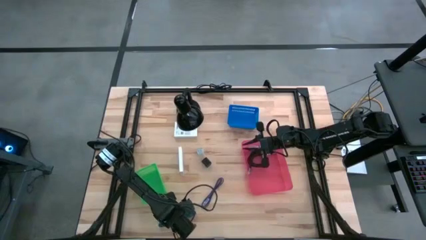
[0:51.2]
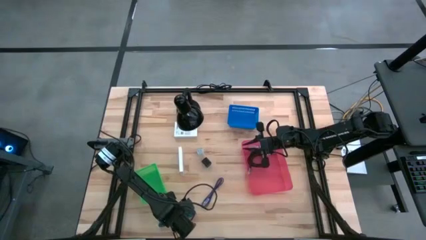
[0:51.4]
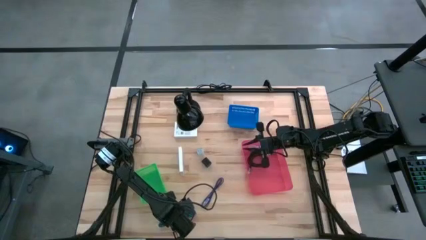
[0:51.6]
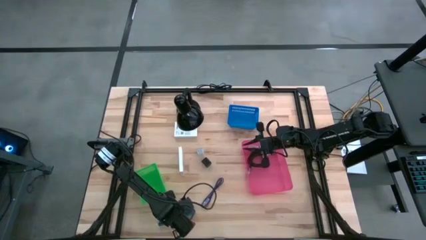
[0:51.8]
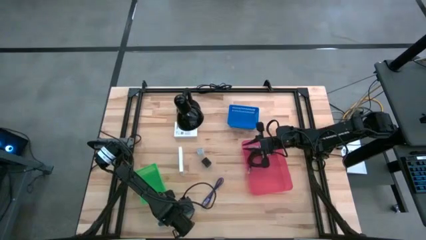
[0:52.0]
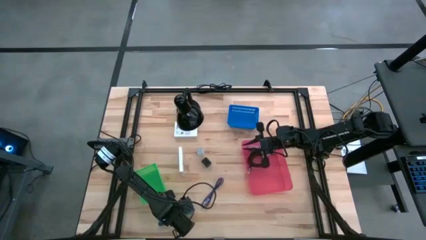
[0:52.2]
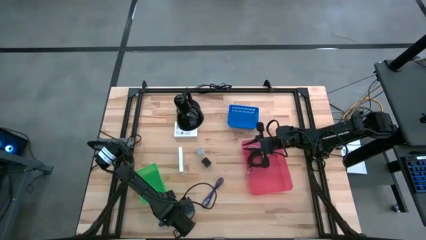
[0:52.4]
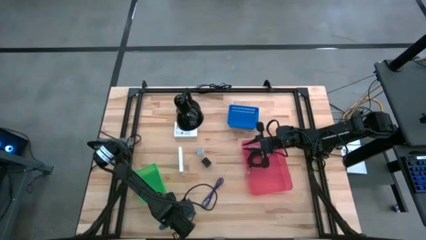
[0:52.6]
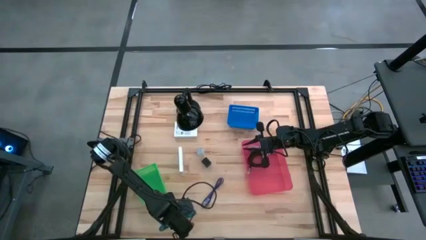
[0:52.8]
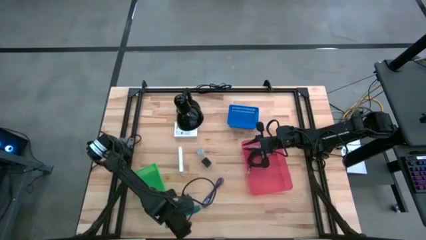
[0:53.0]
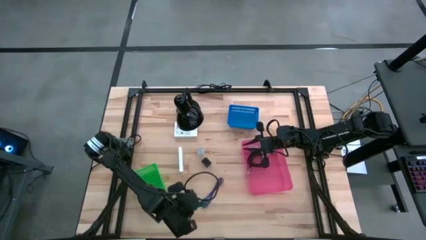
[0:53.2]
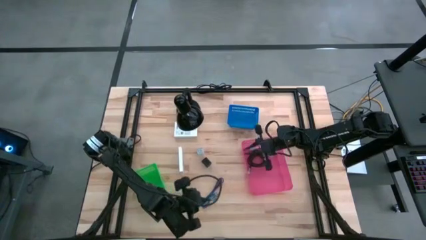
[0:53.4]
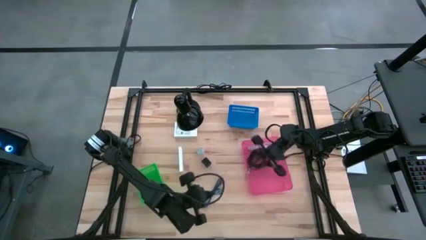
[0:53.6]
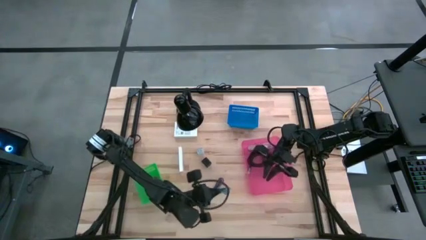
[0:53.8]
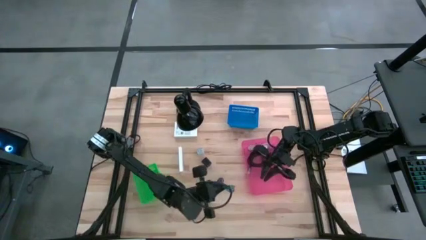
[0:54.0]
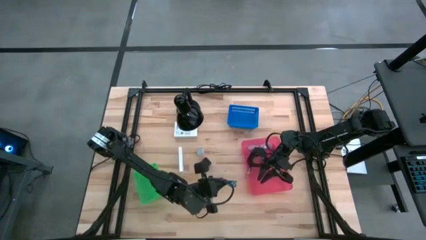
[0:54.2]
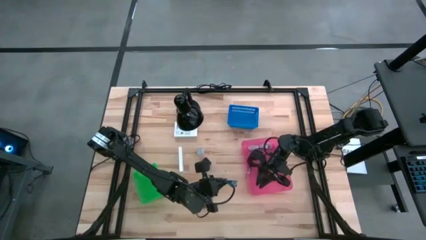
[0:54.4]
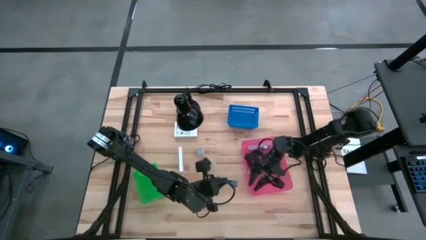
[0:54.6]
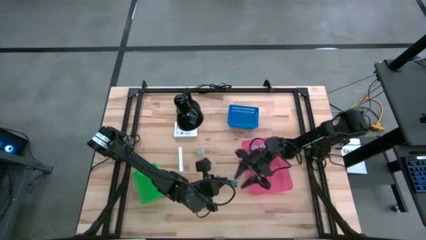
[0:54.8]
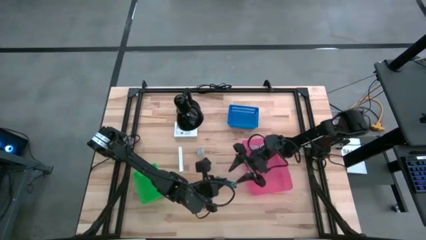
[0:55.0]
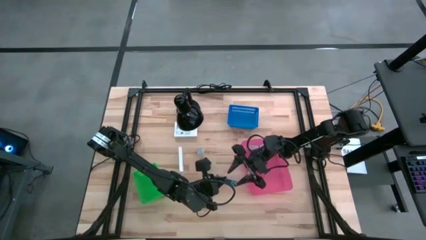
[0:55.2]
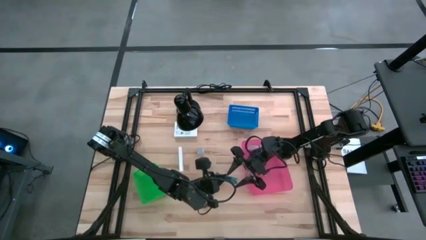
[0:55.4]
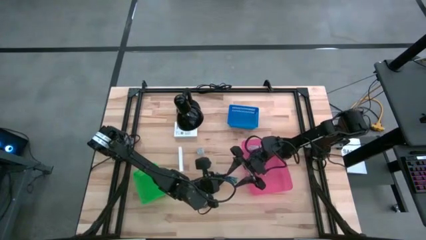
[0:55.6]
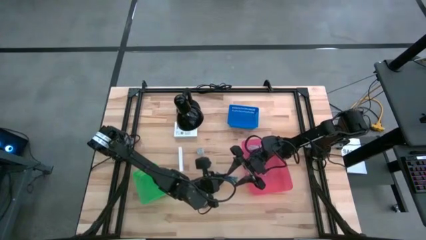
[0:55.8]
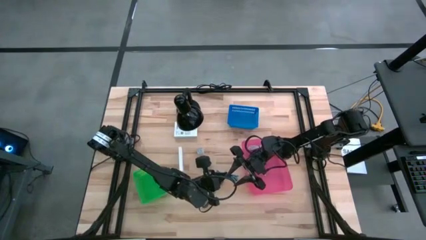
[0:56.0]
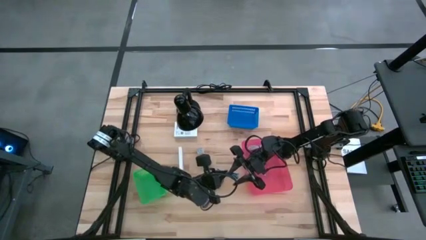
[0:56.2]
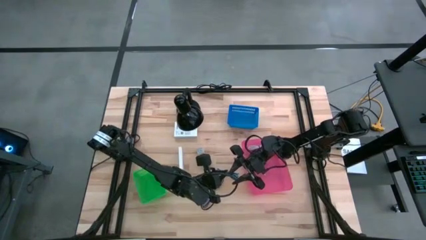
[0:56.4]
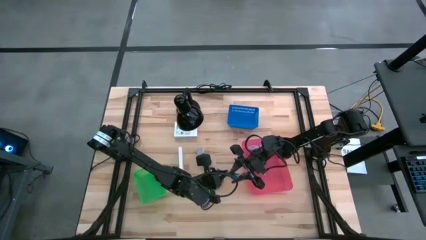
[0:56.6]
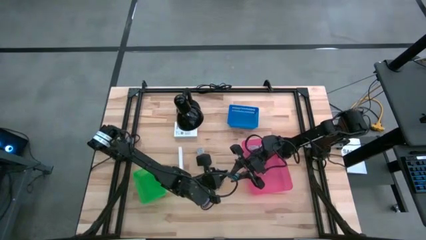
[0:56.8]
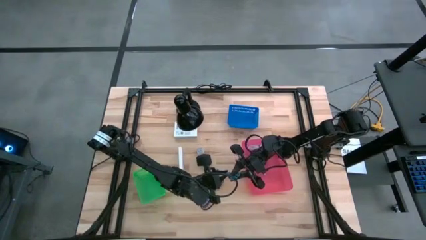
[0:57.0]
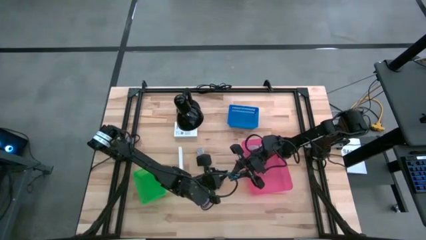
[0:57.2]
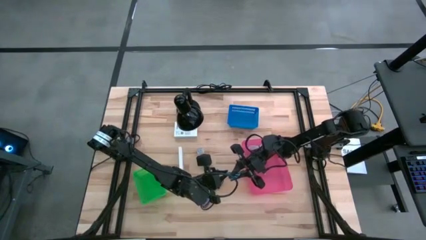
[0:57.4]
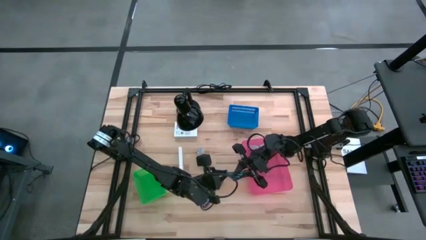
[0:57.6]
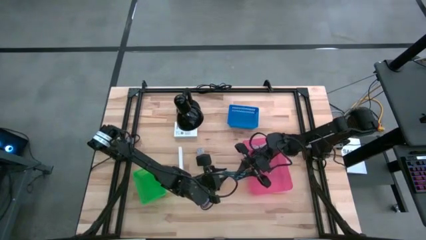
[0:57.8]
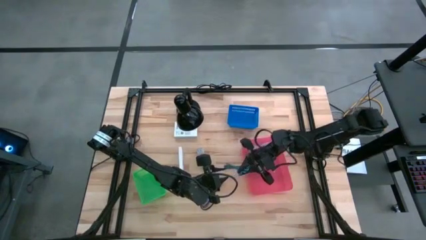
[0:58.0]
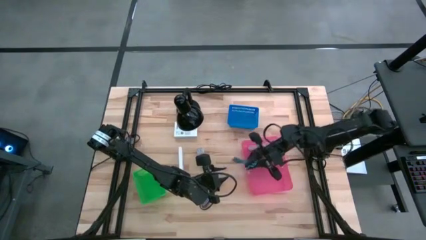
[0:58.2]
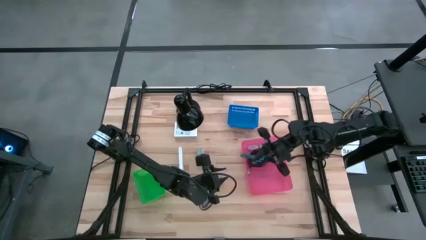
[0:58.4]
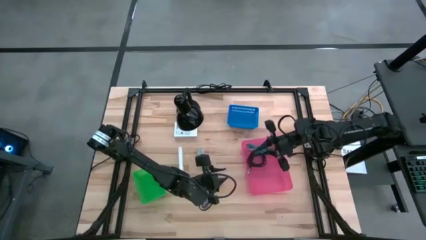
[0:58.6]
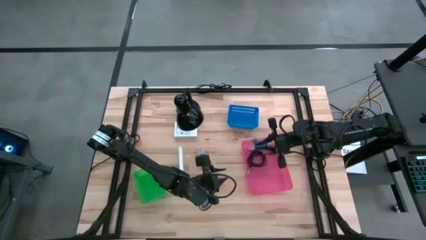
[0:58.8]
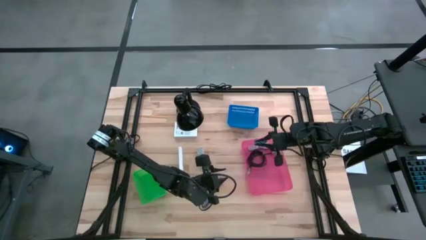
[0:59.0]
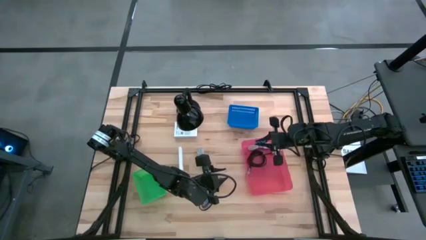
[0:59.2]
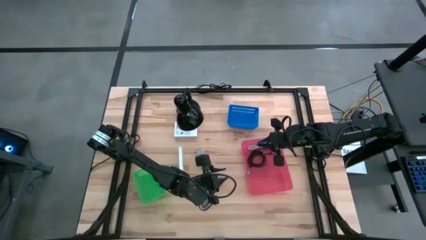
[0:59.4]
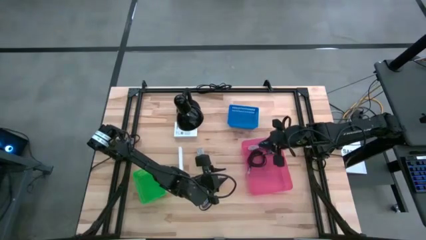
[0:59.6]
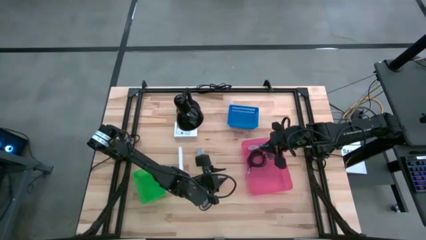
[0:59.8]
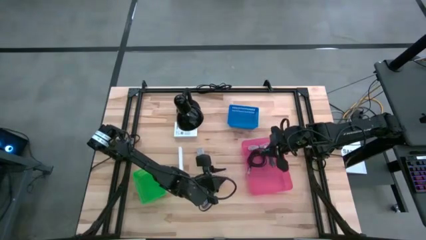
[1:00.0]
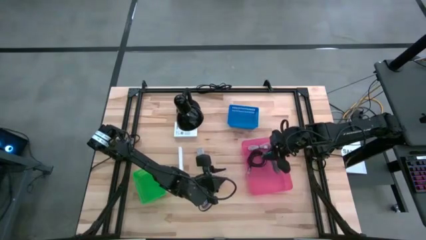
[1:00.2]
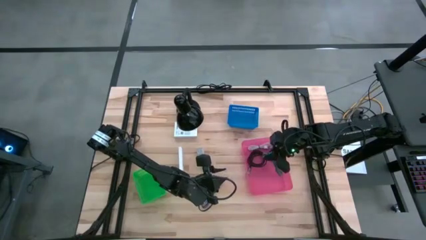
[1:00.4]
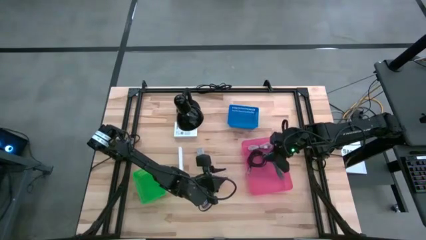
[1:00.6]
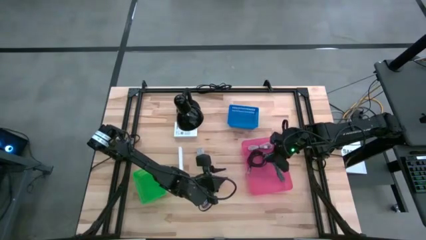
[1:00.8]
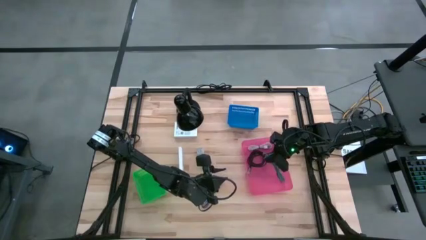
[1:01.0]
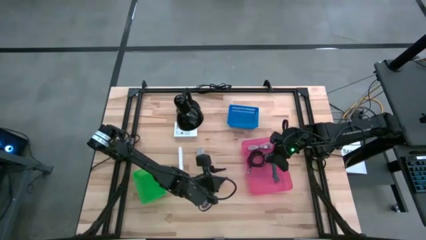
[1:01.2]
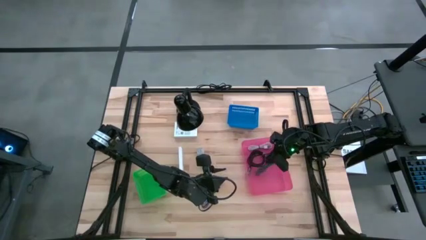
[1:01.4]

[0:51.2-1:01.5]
Task: Pick and place items into bin
Put the blue charger cable into the pink bin

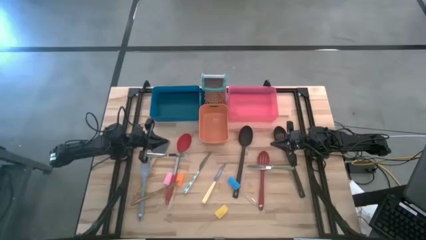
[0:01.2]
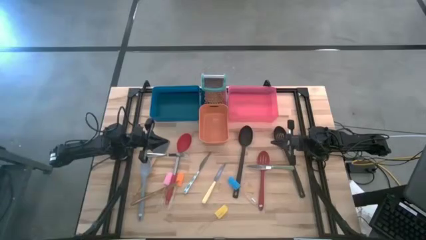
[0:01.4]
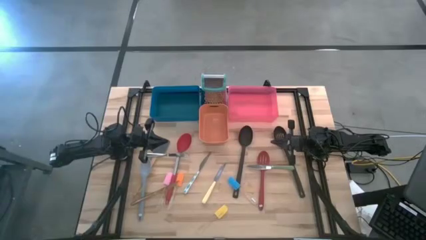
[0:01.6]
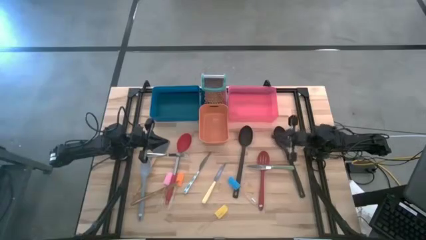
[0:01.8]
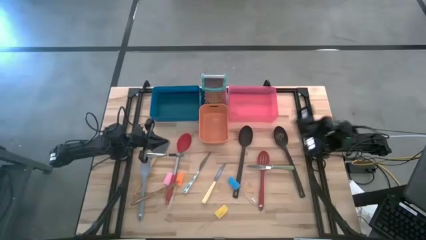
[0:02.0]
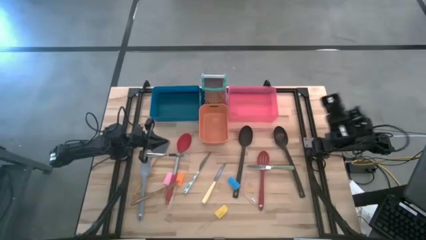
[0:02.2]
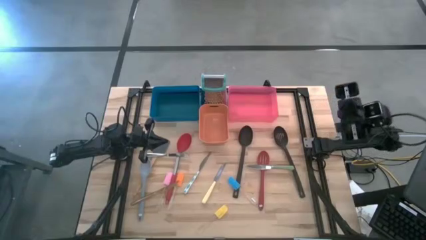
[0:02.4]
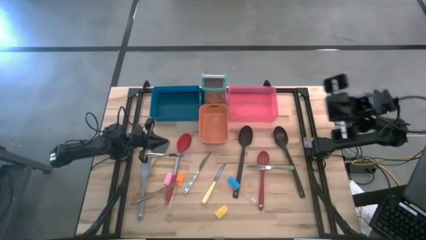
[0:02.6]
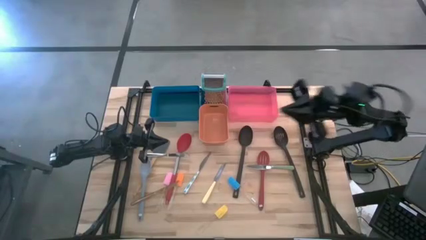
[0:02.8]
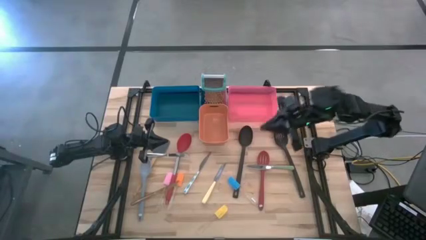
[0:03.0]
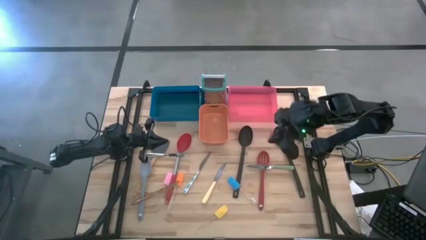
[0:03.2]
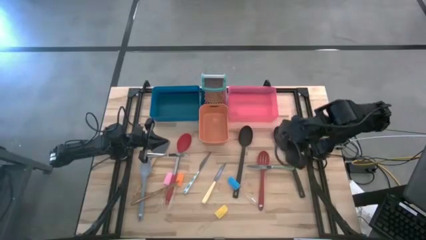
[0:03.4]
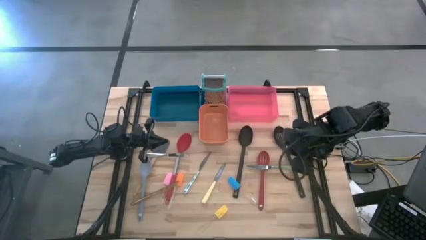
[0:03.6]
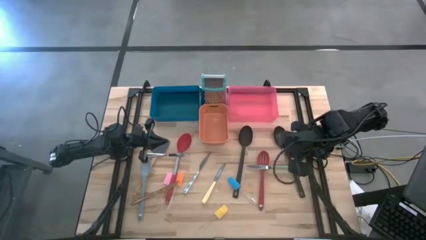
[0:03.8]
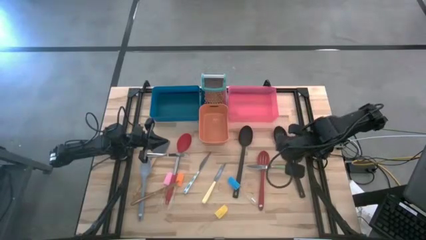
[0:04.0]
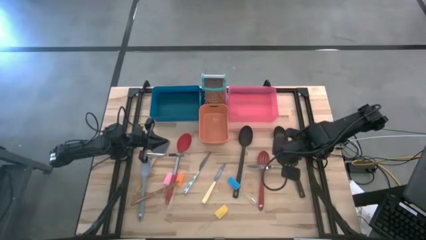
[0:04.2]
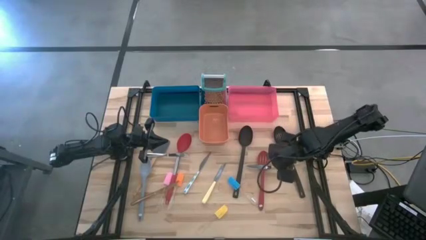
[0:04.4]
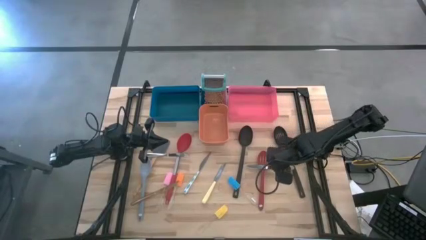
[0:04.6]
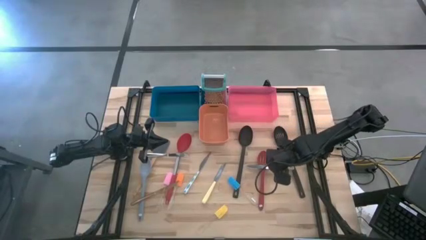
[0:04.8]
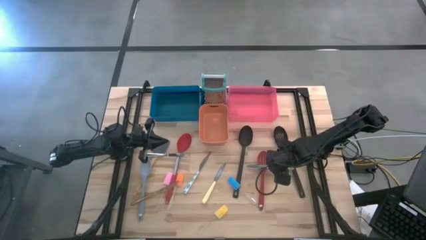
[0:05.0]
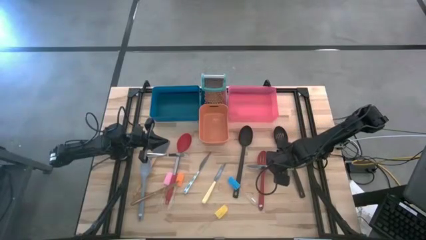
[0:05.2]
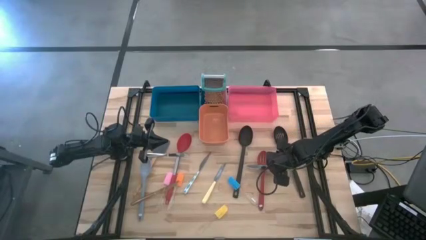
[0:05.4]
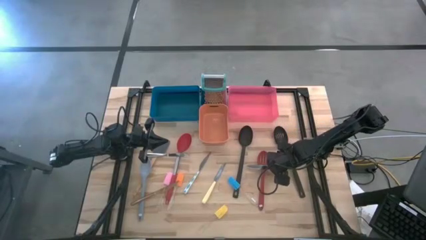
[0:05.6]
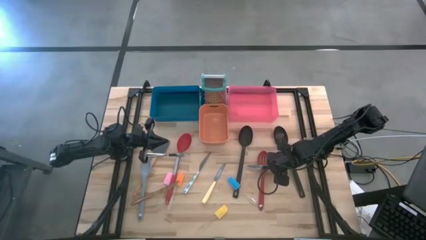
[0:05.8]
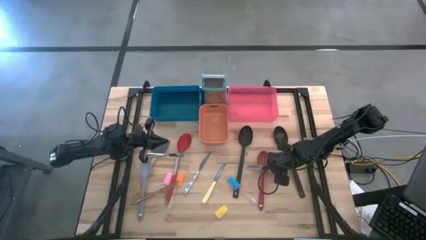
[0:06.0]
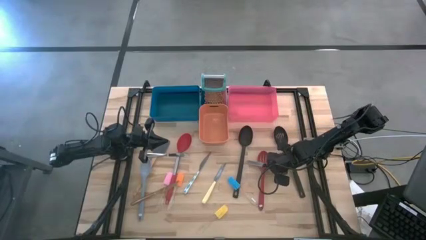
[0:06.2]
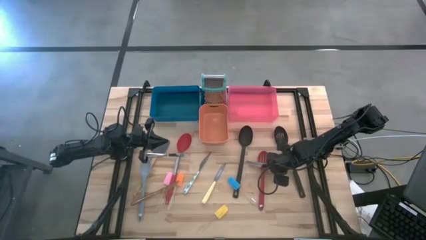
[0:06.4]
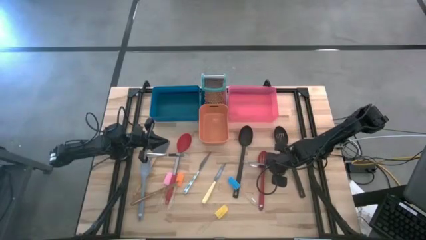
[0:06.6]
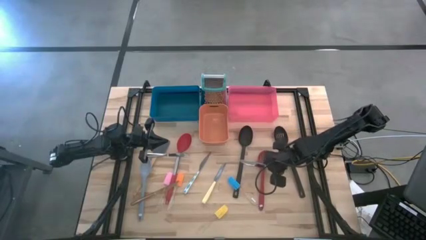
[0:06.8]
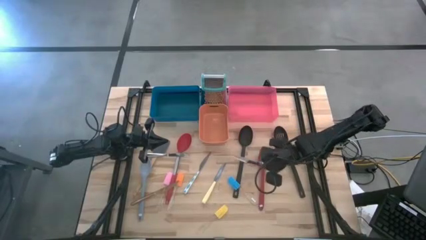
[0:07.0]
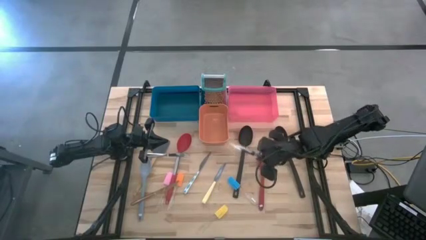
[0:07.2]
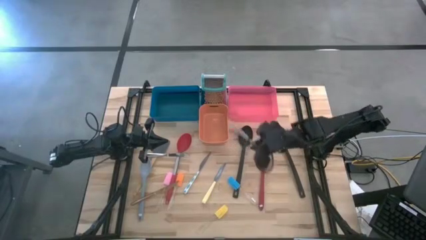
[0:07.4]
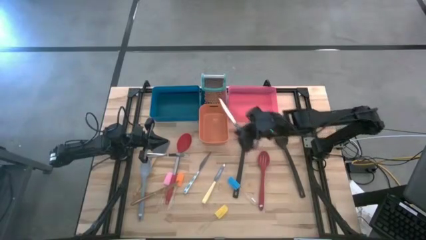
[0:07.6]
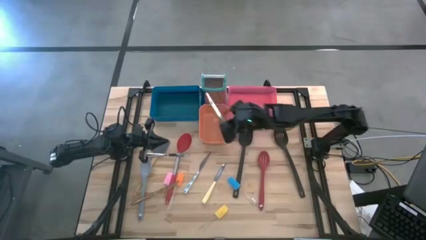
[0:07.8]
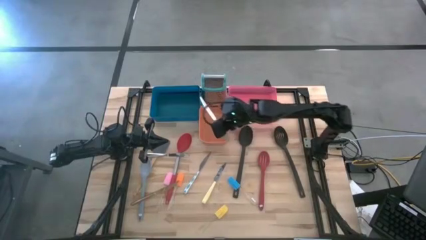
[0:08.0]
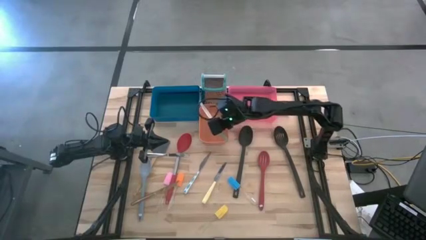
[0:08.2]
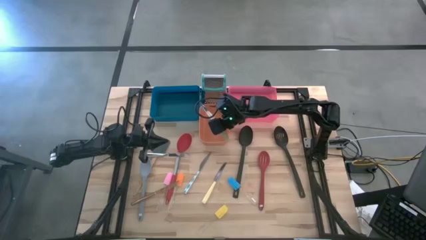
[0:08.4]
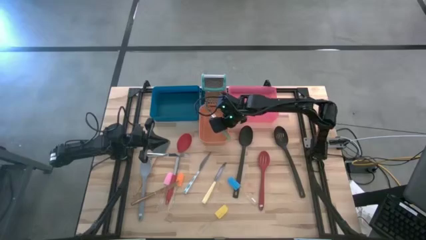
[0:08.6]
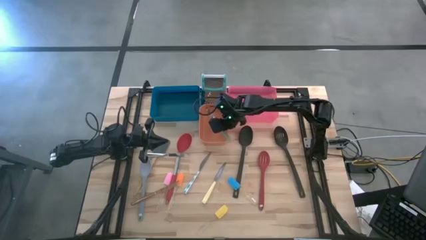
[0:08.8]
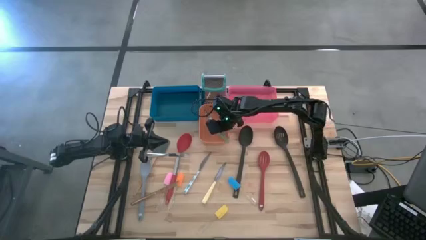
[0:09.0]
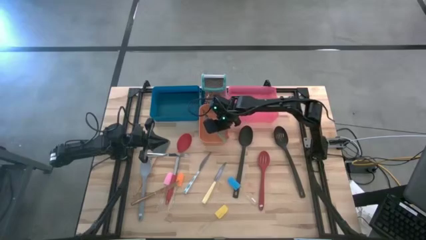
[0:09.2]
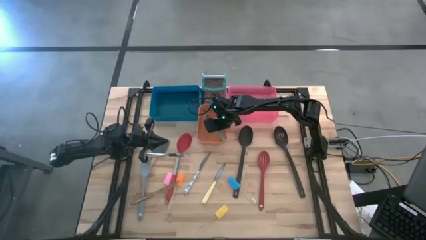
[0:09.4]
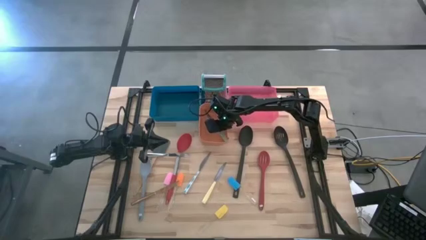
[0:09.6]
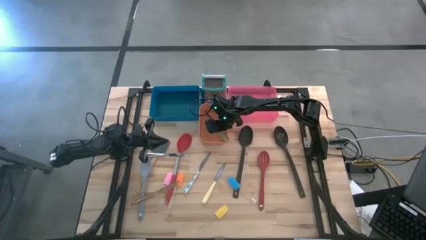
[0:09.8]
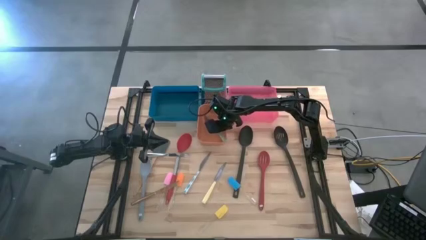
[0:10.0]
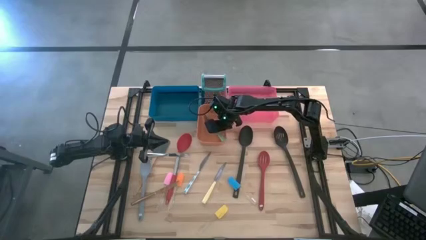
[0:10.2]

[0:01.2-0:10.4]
Task: Pick & Place Kitchen Items
Put the green table table knife into the orange bin
